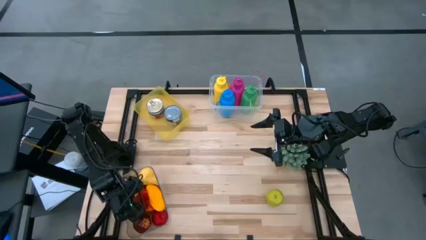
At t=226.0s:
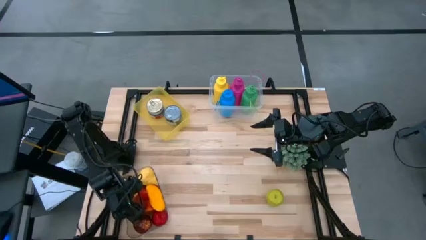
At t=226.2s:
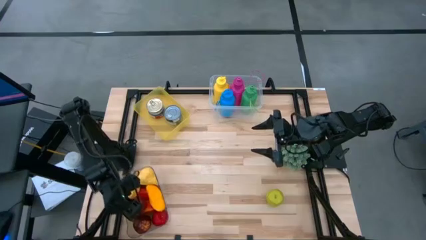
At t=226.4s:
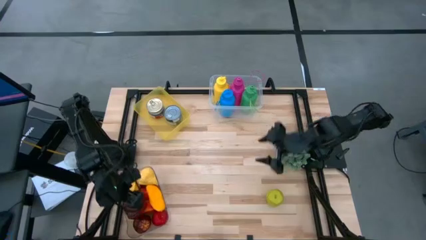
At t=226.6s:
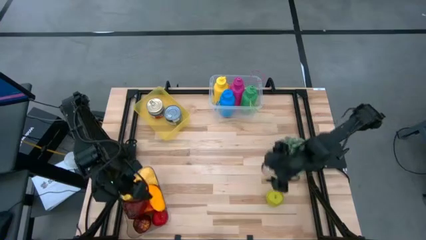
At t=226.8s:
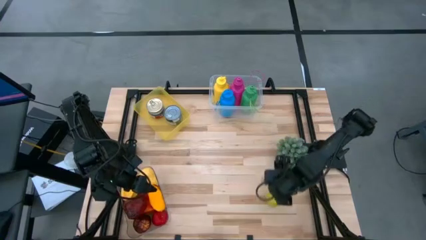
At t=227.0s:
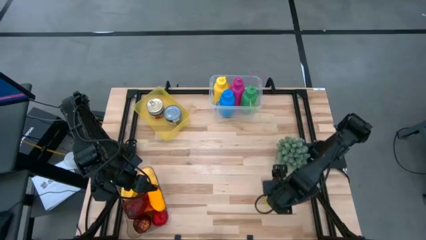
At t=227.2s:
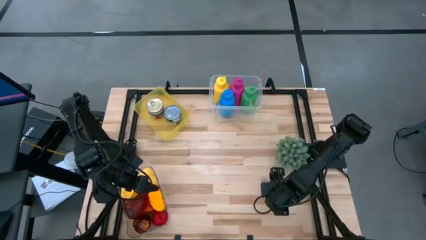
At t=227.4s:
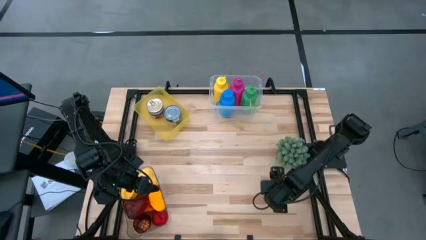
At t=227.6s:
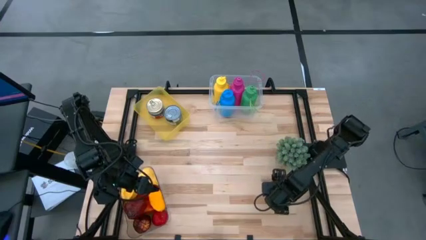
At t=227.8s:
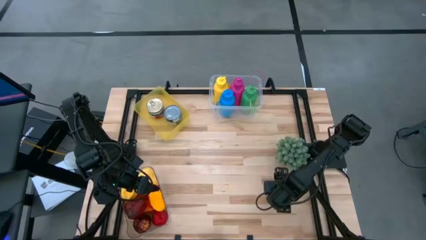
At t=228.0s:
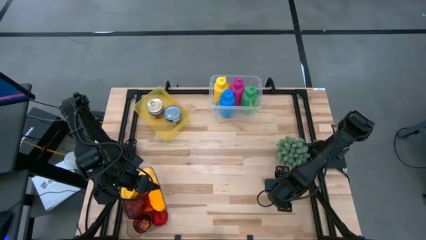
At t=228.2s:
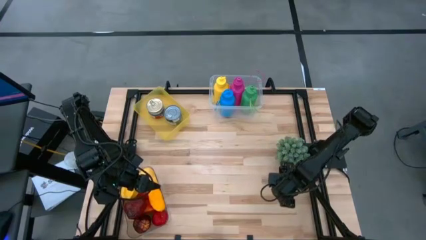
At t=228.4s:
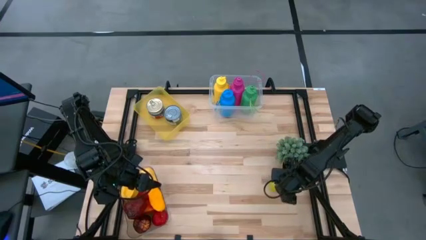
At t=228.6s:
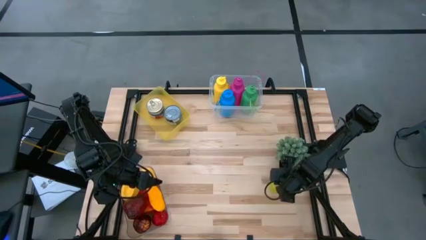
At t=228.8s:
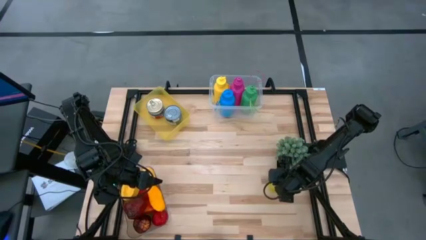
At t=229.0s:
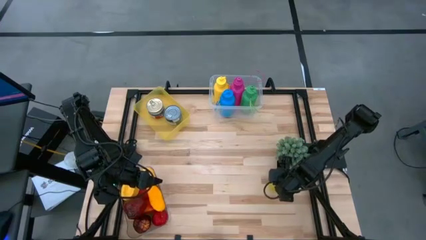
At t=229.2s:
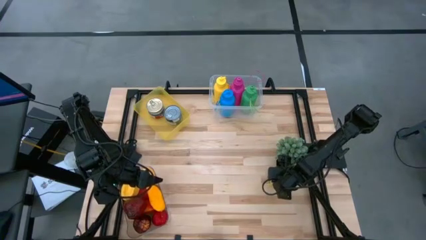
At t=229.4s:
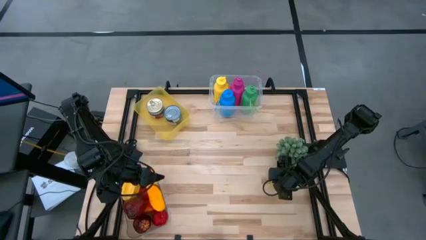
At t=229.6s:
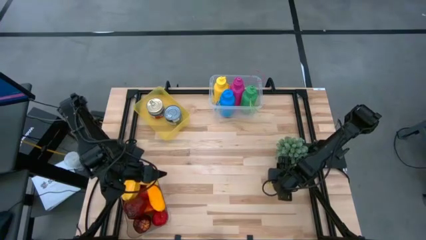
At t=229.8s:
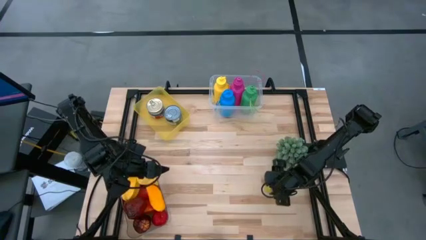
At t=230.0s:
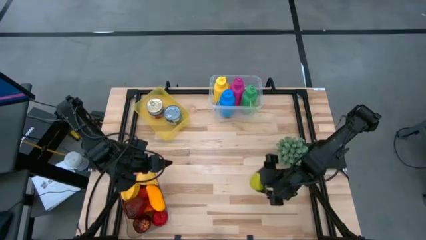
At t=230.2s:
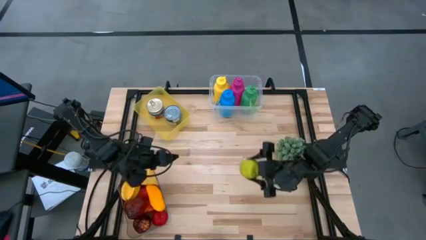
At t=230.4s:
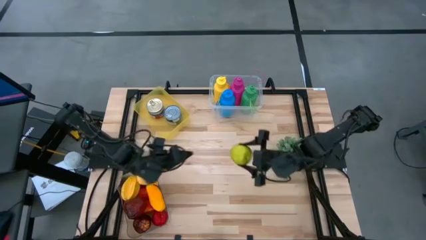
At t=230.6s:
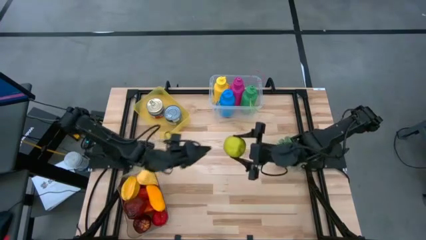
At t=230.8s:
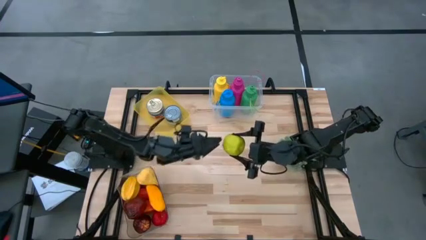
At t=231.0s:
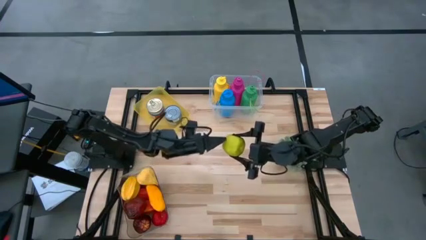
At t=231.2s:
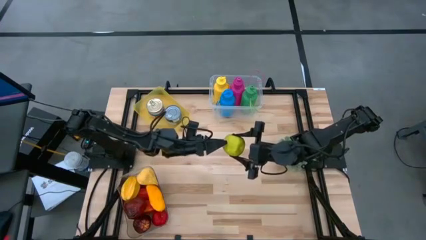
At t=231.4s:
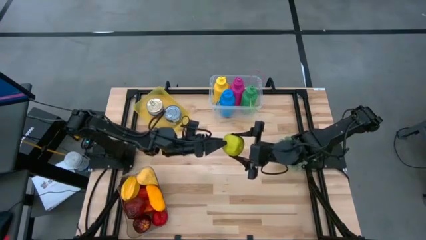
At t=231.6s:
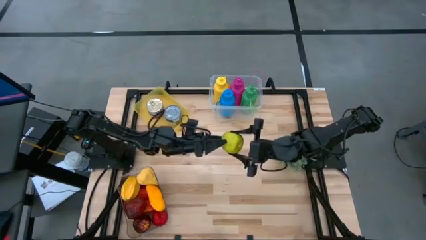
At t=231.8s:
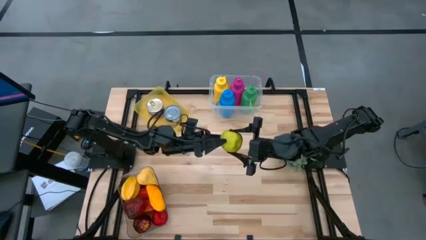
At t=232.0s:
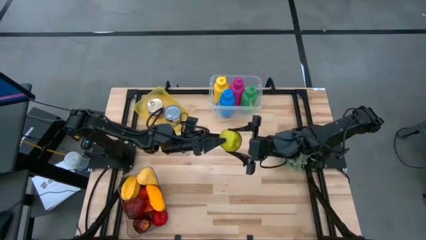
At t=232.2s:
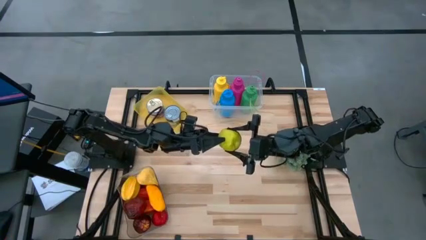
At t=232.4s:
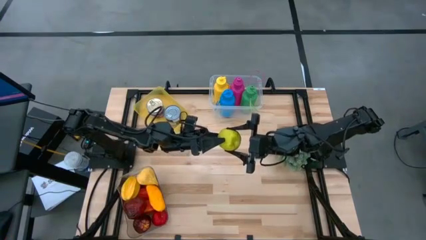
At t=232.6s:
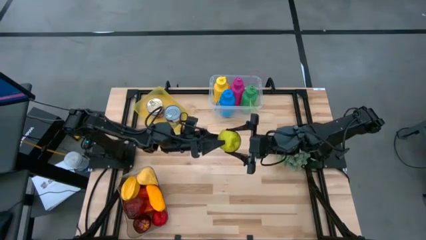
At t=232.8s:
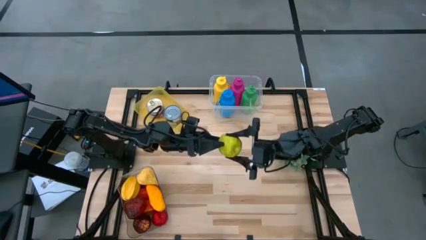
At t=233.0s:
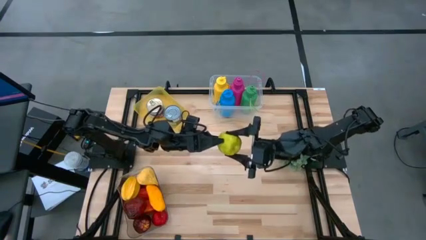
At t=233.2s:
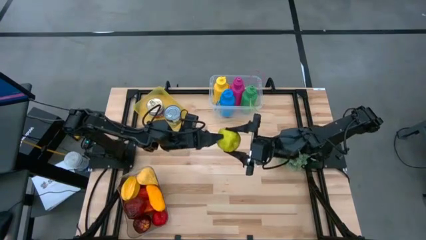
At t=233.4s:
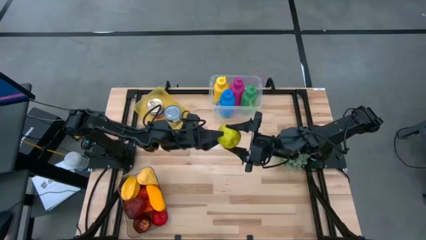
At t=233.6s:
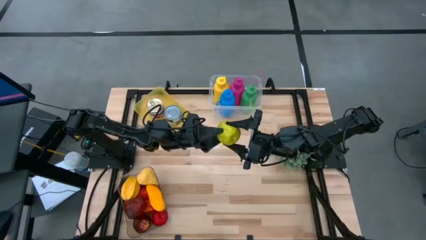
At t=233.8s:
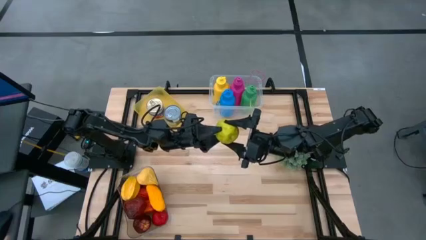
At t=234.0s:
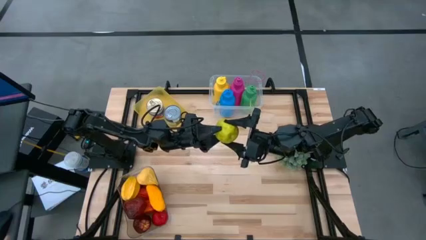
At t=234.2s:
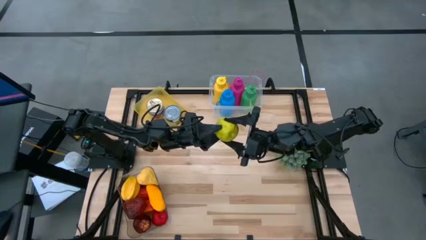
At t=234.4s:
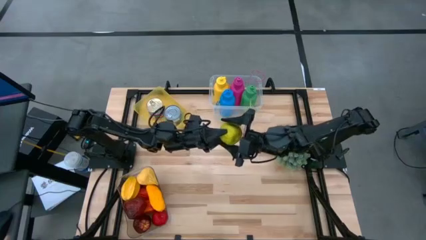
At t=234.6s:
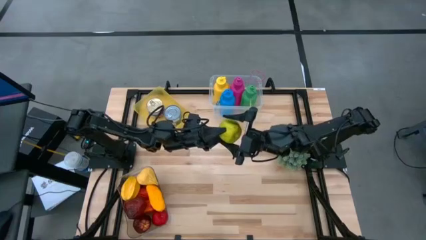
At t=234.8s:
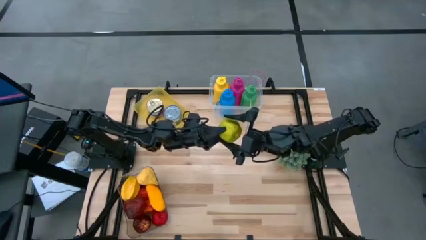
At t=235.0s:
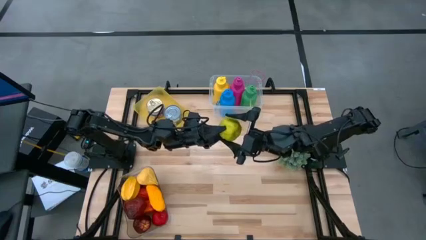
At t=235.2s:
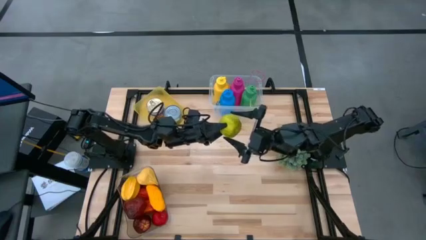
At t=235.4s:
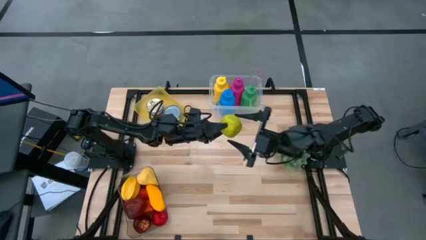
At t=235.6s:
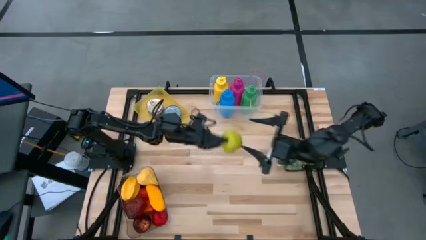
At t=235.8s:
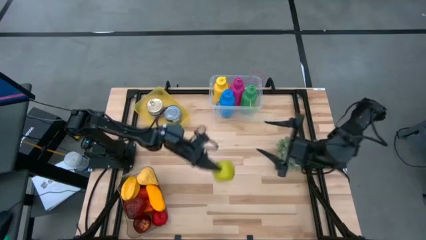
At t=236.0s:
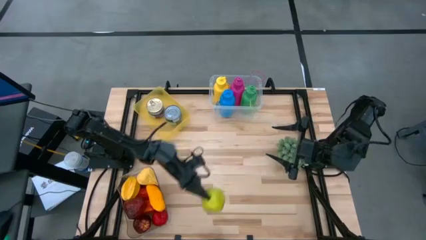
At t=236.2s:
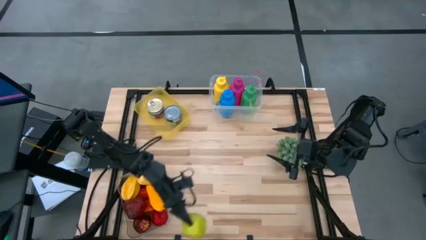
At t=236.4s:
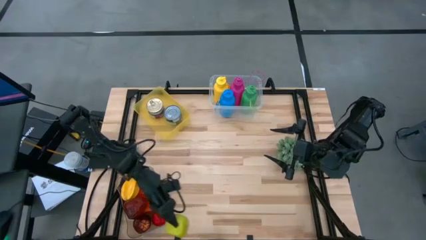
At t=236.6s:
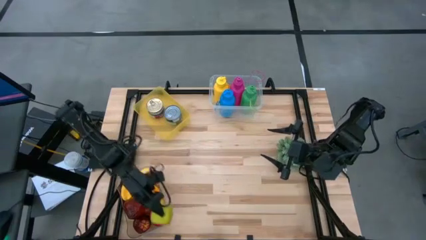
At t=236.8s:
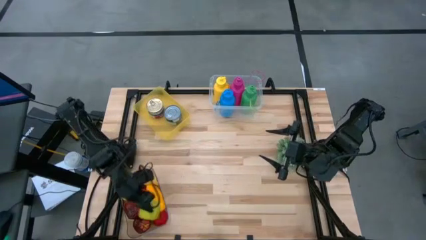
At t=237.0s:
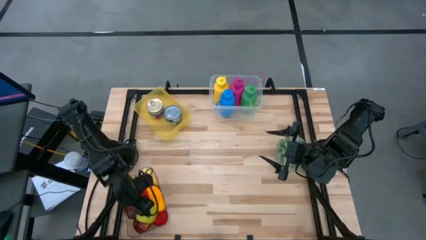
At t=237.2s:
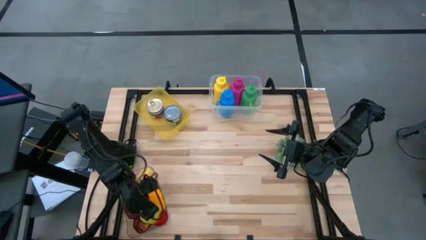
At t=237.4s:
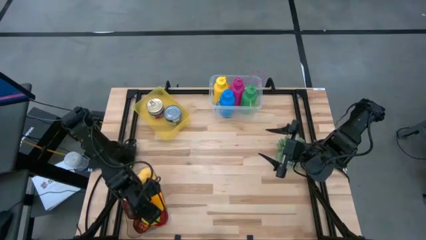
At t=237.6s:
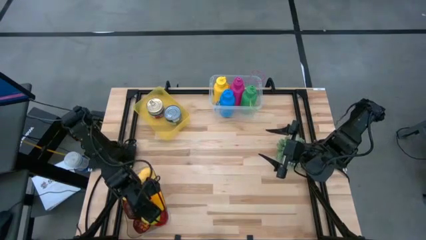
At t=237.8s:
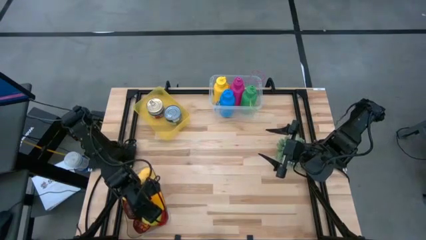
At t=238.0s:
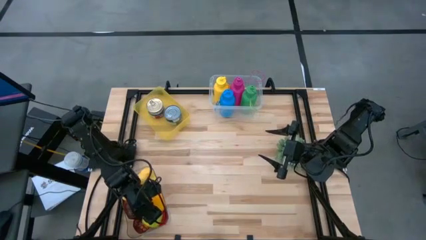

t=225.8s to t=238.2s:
Task: Pick & Place Food Item
Put the green apple into the transparent bin
